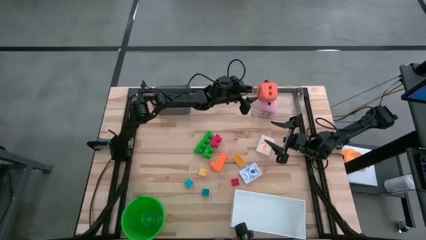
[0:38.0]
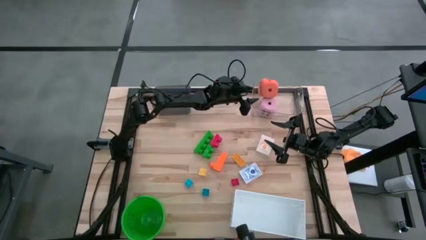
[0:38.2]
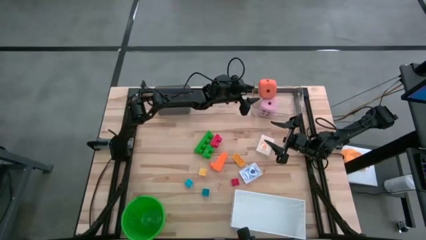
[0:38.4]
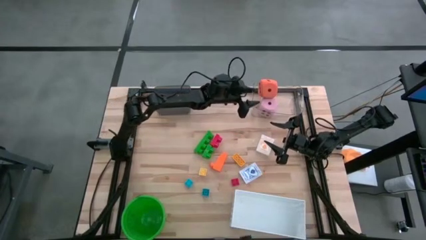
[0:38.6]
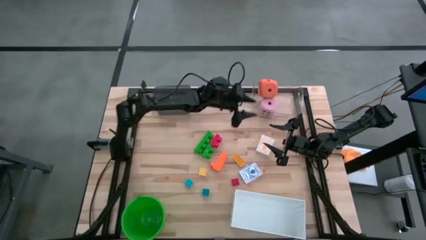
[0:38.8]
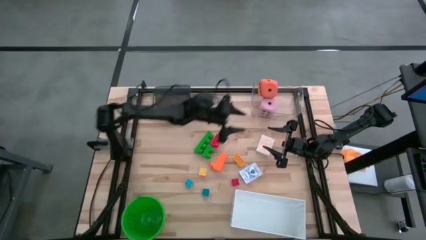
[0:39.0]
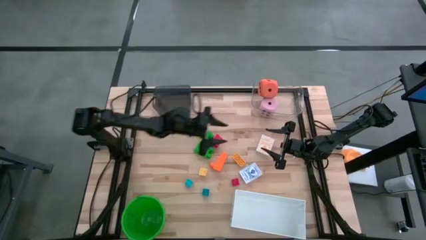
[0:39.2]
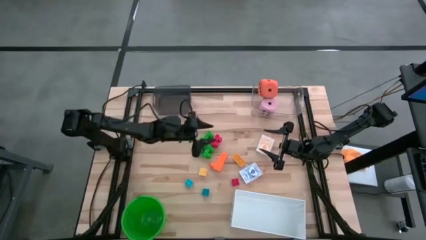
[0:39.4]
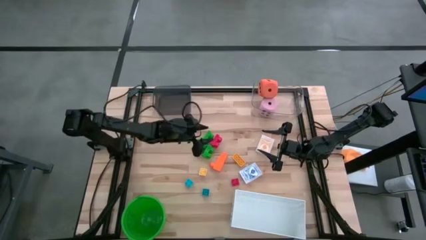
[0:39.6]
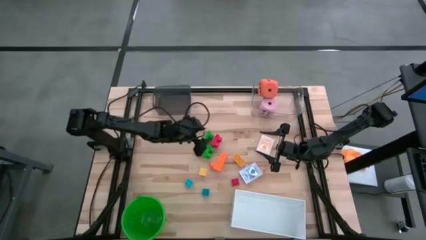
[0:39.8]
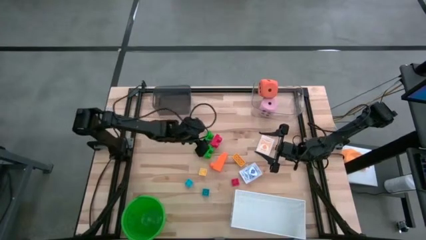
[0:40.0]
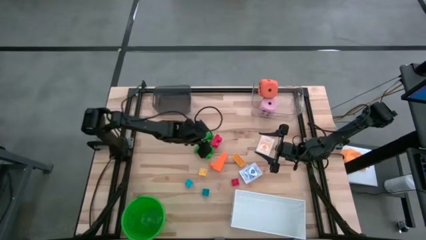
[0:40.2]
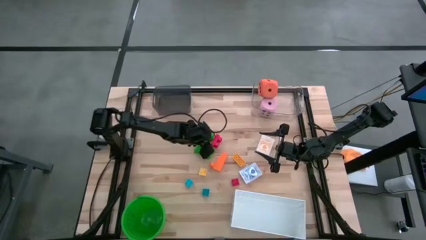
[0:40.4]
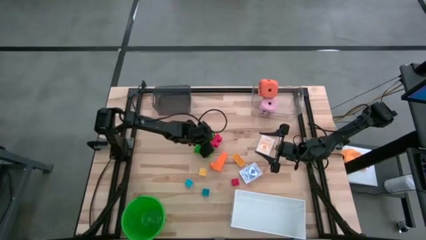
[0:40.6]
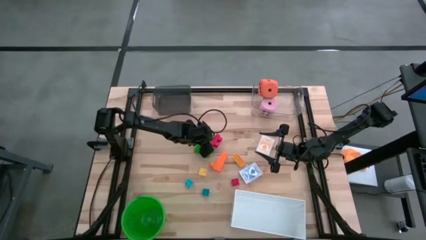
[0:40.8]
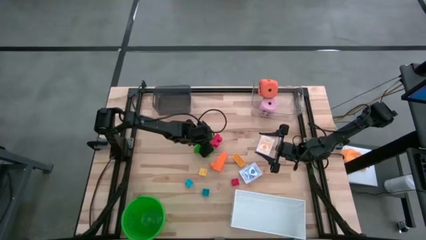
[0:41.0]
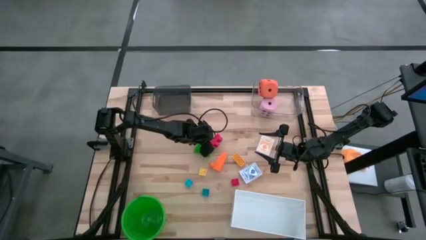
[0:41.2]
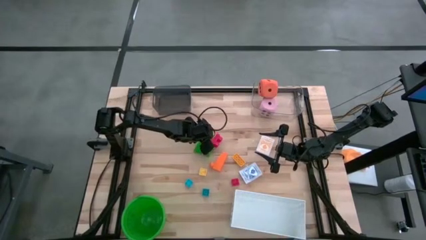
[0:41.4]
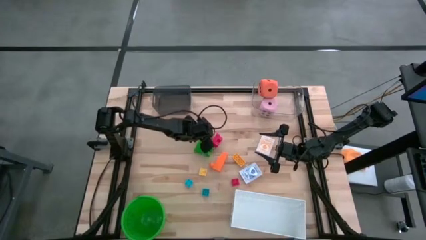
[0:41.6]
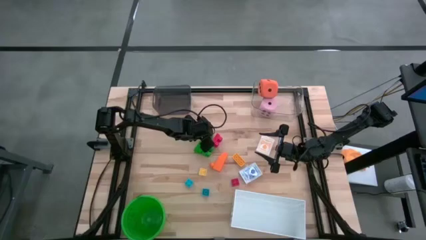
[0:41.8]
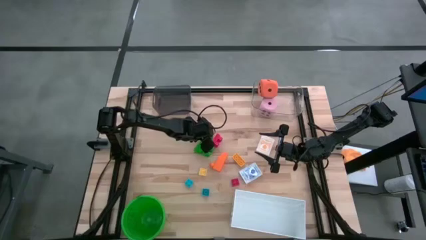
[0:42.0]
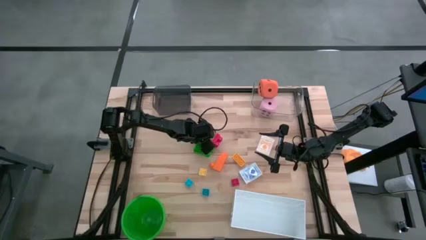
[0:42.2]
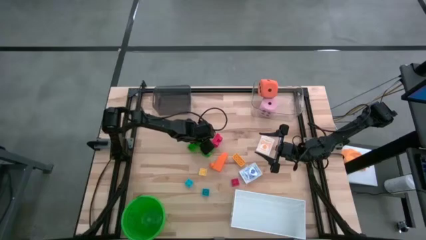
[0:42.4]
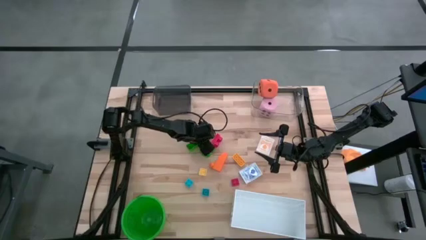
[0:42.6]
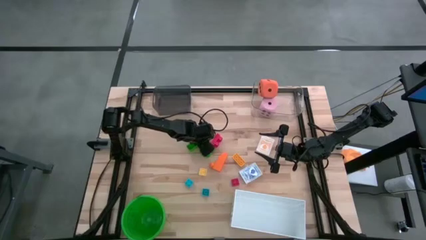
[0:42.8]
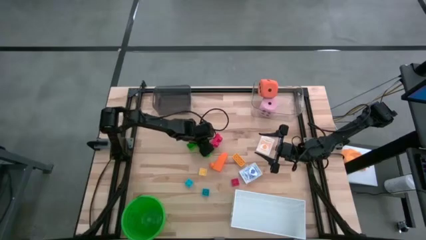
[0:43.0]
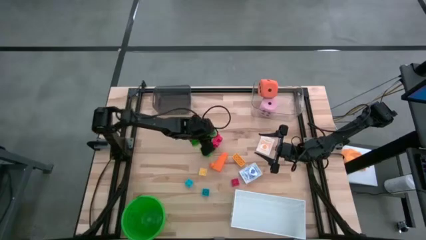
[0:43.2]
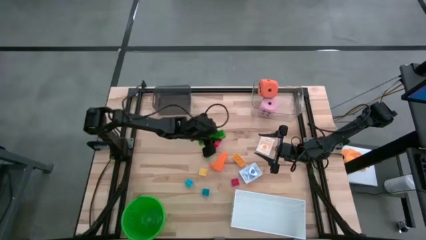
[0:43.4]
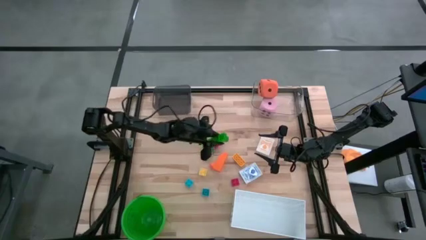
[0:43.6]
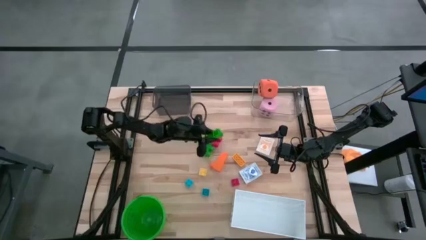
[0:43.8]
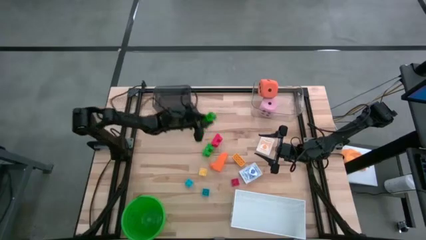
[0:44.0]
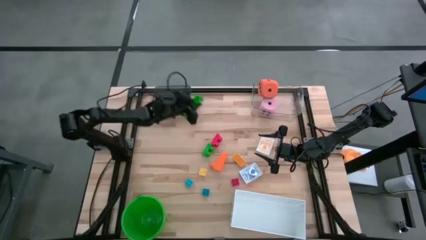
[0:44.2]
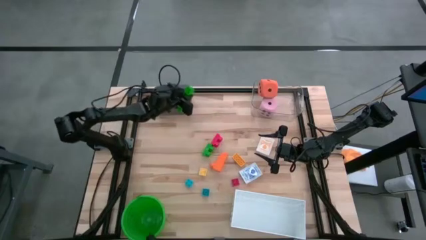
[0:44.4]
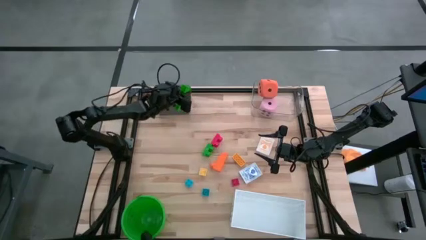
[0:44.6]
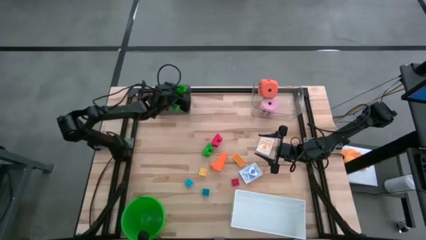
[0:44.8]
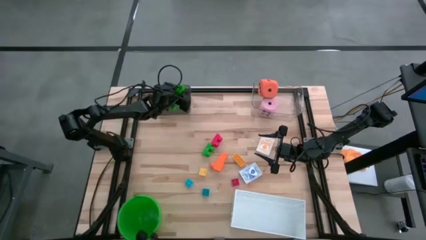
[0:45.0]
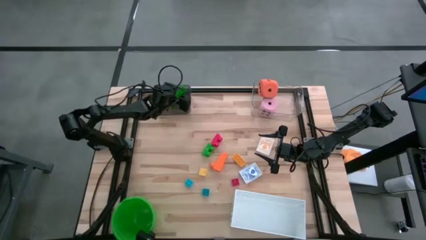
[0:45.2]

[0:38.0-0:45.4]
Task: Pick & Place Toys
Put the top green game piece into the black bin

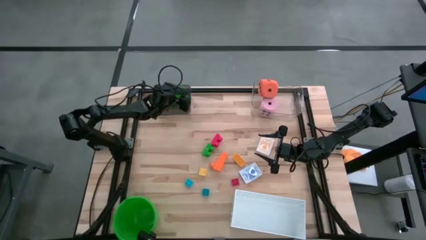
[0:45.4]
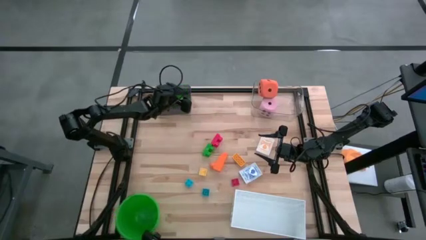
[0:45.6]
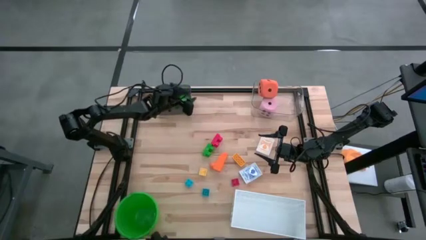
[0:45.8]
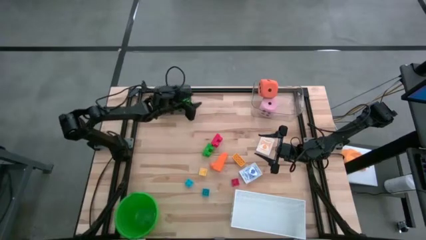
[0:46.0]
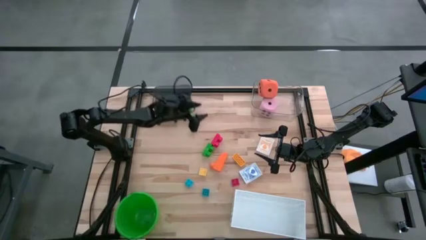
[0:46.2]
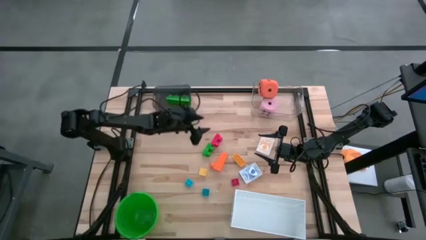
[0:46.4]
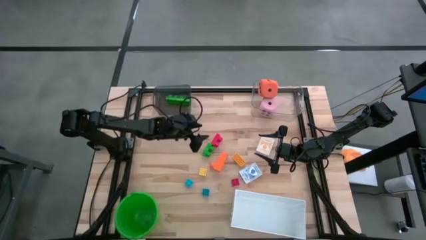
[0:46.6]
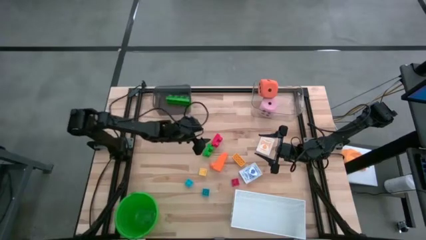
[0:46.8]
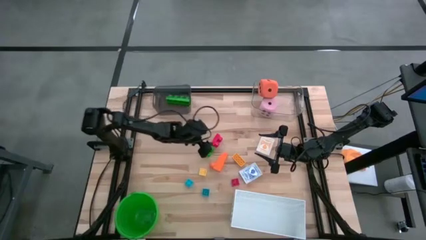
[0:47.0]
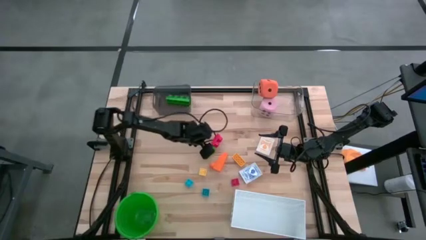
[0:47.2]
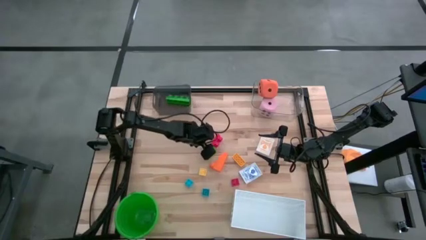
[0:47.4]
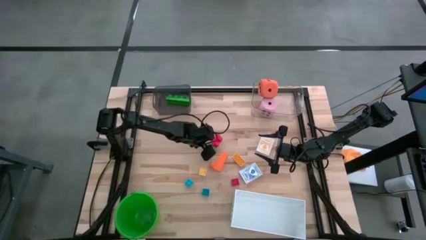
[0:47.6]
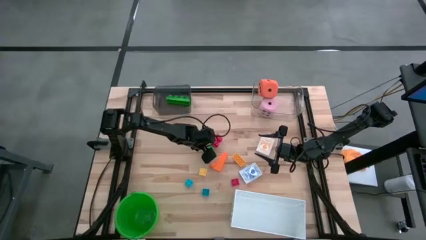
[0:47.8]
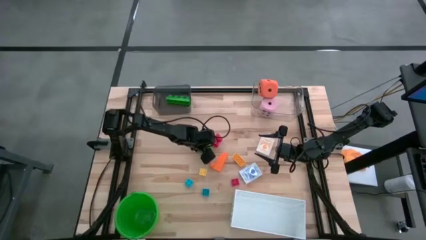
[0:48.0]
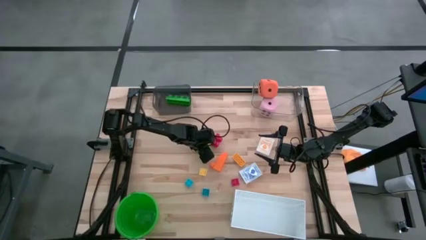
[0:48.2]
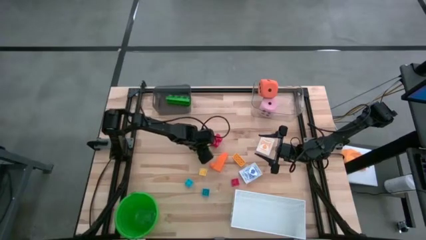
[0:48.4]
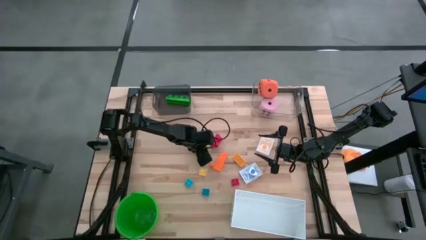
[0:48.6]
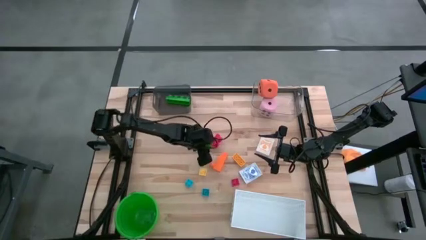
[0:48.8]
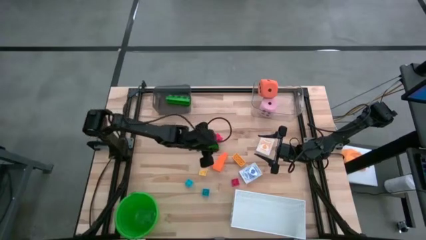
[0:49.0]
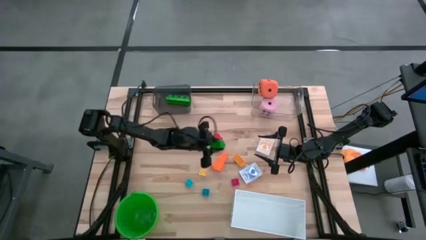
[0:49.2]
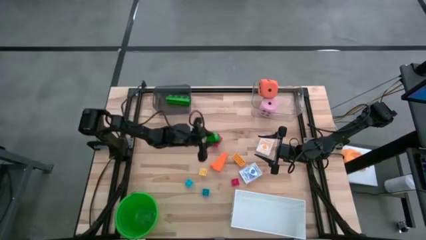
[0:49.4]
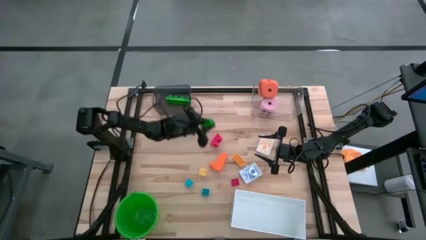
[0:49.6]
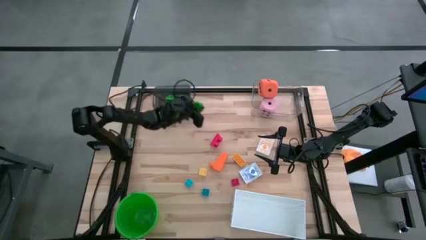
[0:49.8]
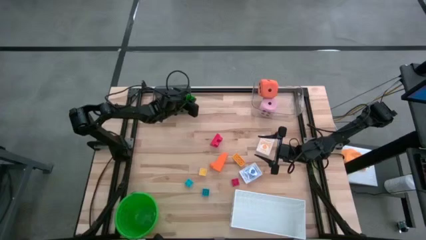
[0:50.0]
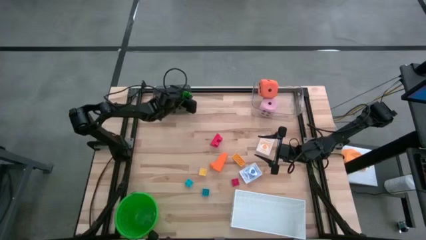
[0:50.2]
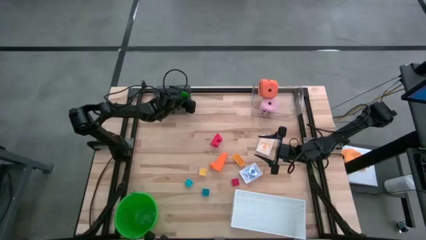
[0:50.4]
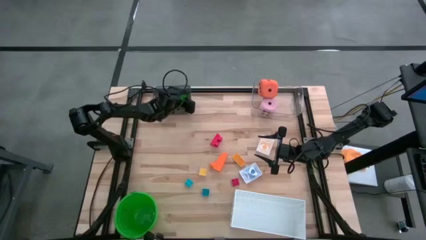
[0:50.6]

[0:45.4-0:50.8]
Put the green game piece into the black bin

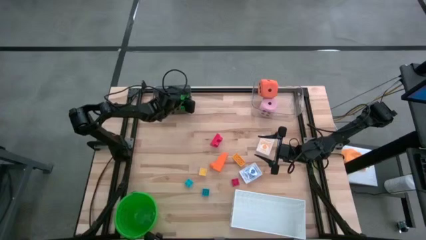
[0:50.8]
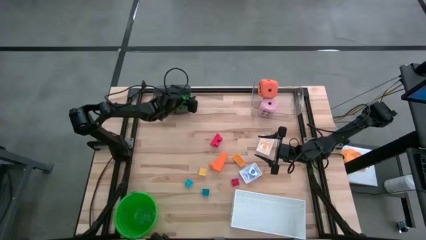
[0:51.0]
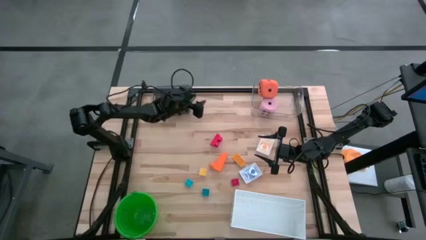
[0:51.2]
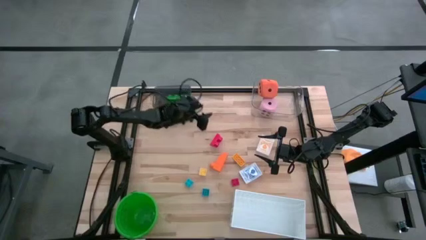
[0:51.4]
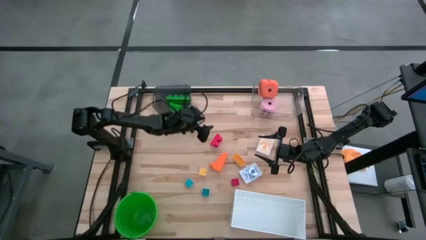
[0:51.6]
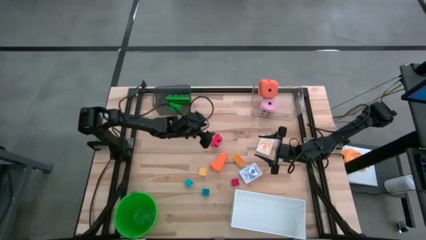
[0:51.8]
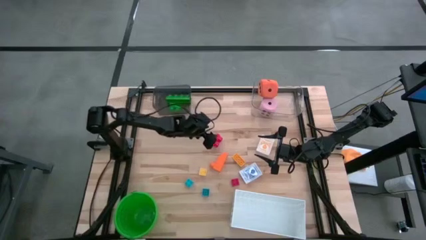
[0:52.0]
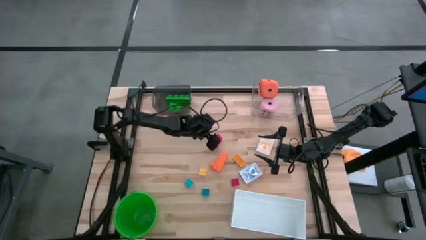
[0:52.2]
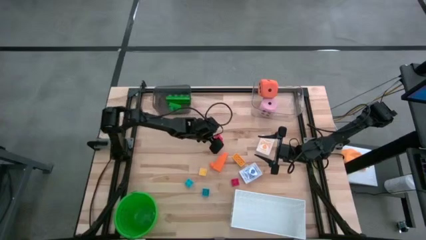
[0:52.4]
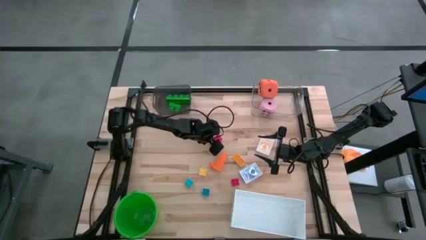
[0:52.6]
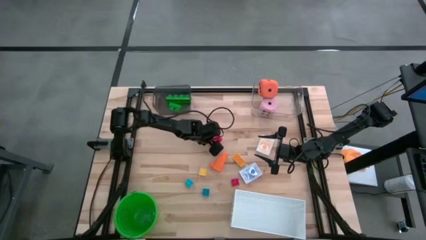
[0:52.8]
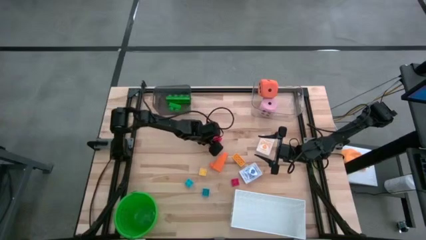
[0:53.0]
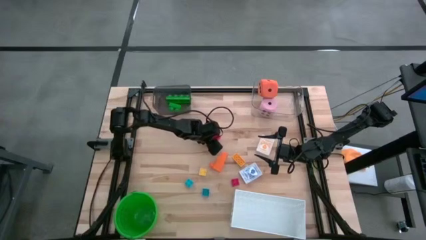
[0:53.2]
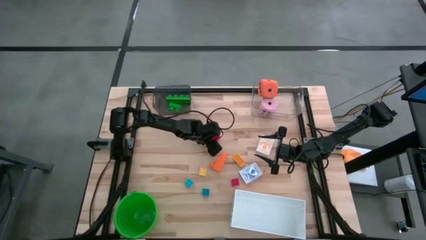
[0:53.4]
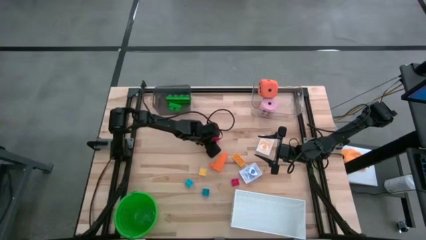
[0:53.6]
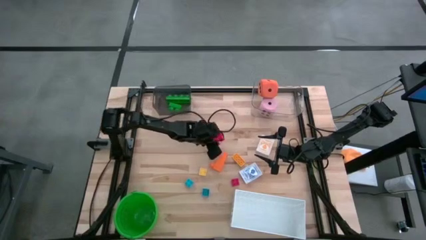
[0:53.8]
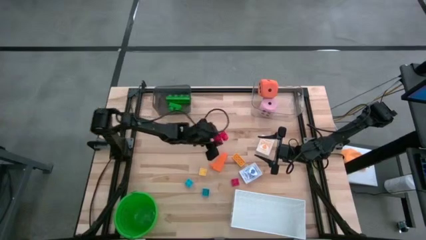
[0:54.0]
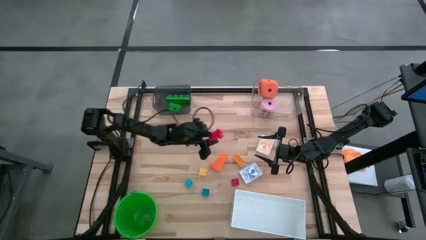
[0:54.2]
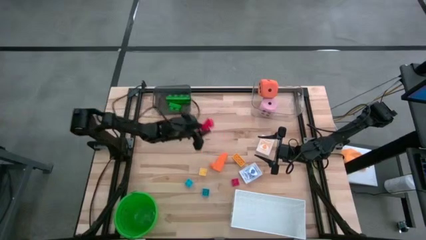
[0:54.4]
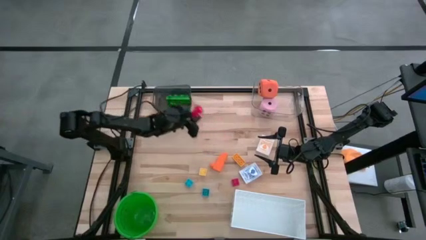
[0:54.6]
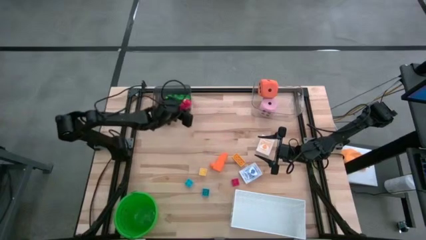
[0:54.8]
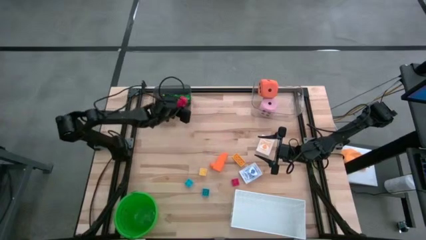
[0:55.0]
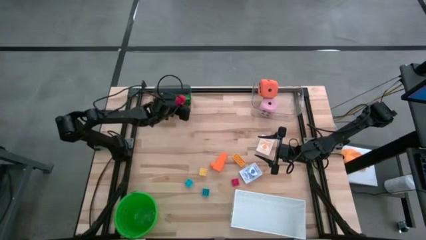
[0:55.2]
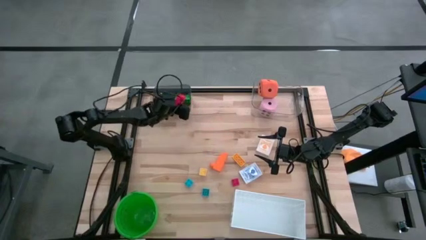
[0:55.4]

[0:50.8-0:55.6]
Put the red game piece into the black bin
